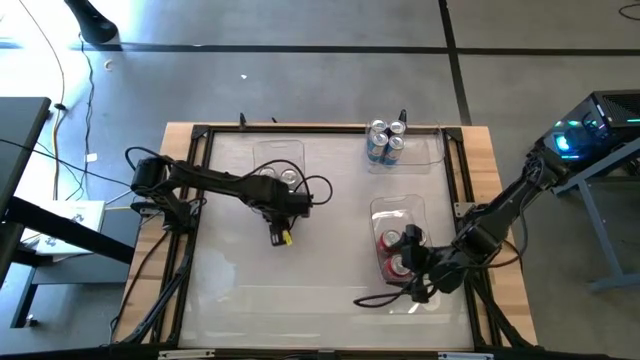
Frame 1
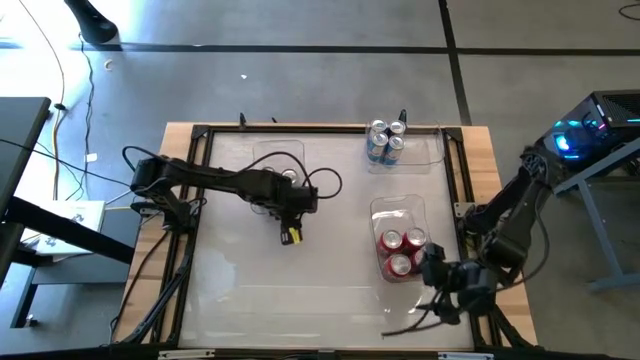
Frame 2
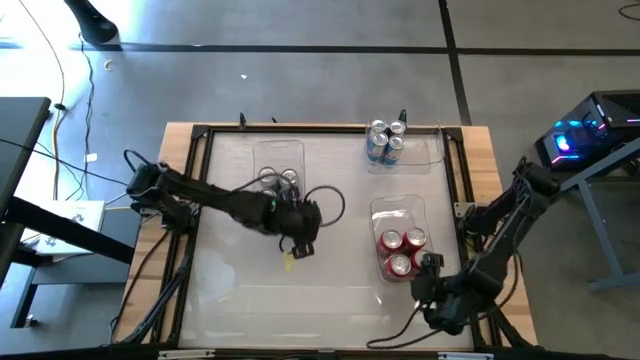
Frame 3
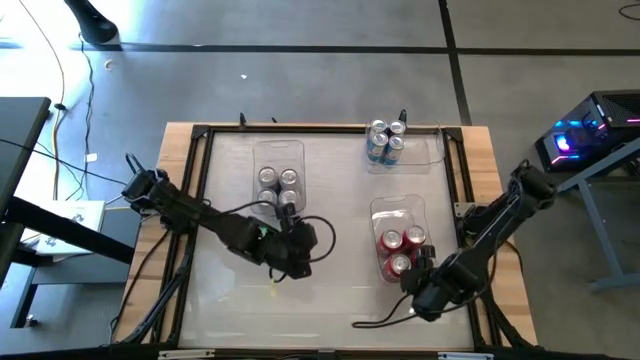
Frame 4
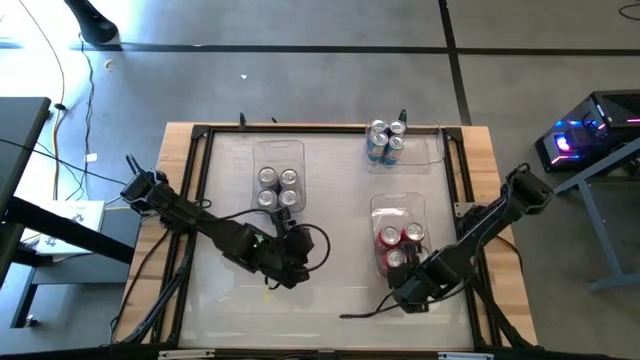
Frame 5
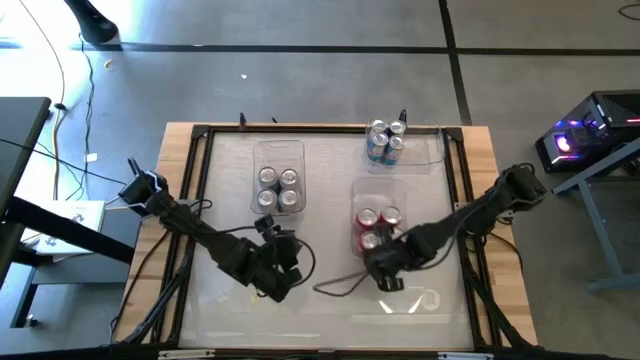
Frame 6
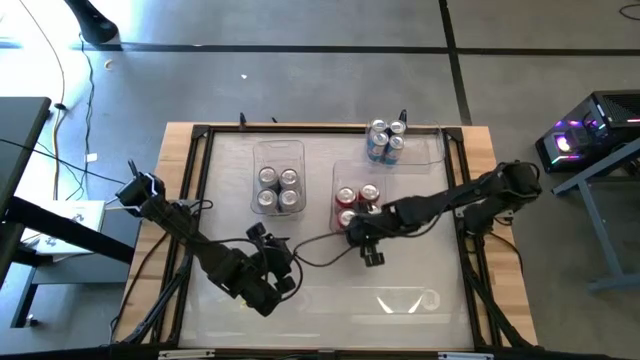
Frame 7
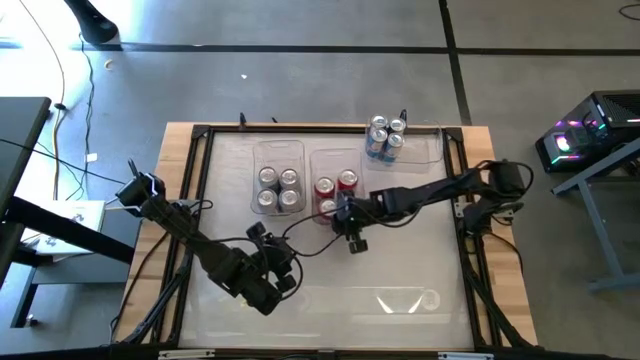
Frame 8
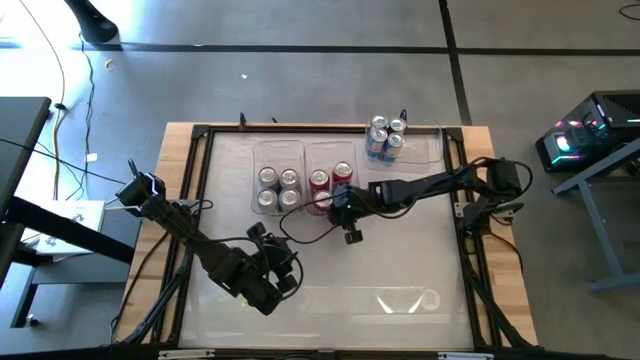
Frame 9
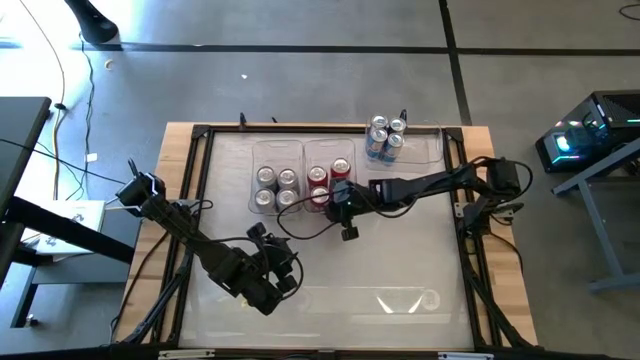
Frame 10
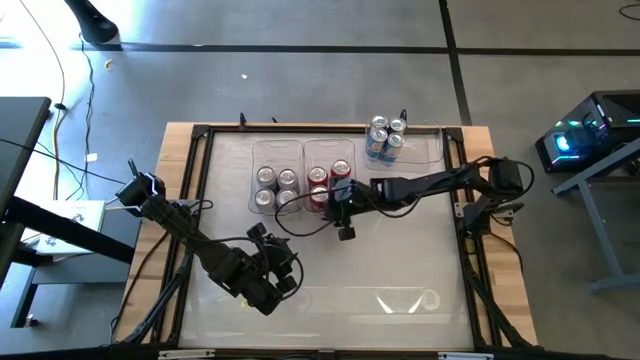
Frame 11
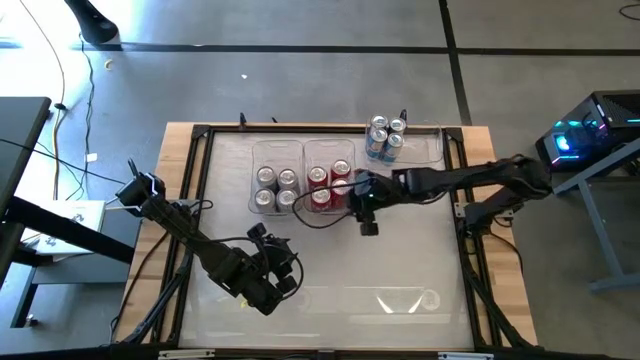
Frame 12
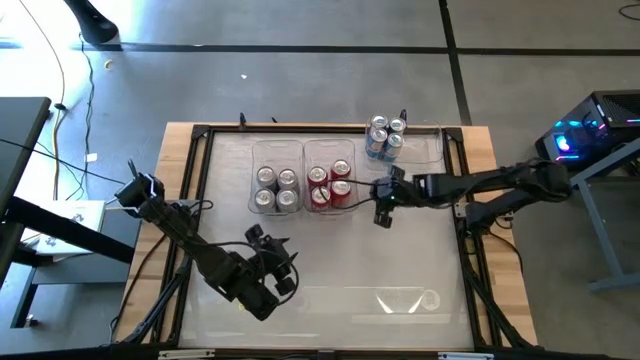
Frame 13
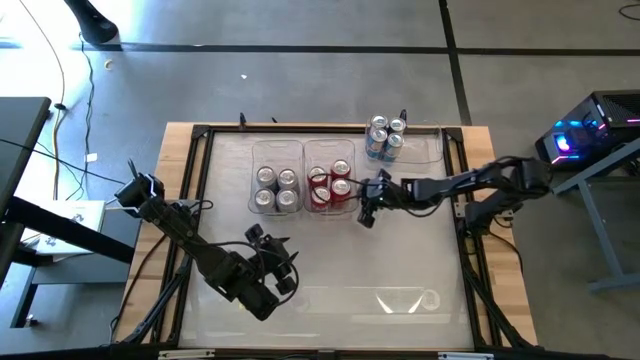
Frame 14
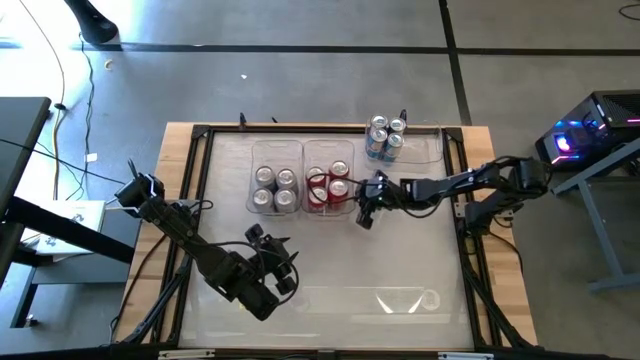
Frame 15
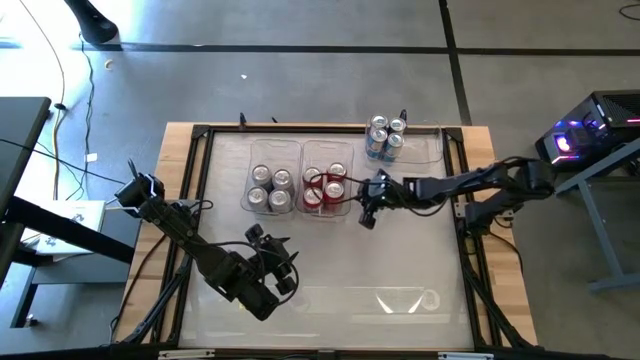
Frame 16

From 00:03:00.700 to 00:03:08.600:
Task: Sort soda cans
Move the bottom right transparent bin to the top center of the table, aligned to the right of the top left transparent bin

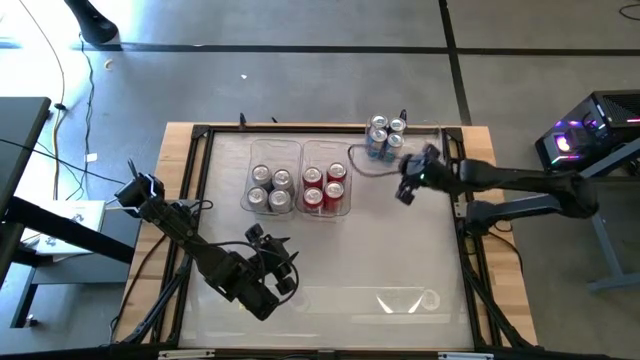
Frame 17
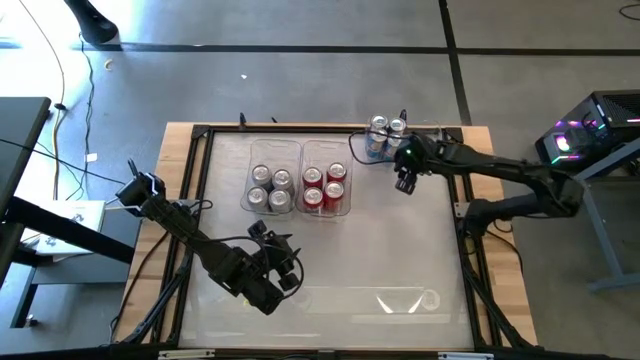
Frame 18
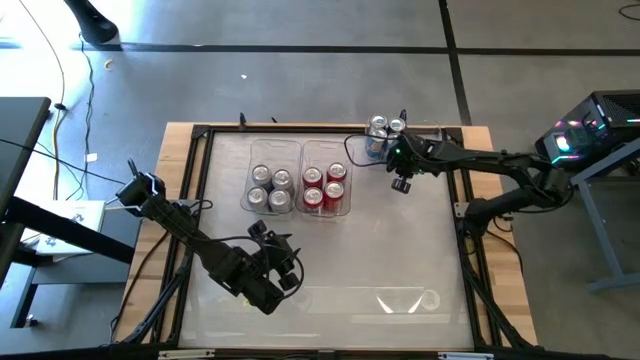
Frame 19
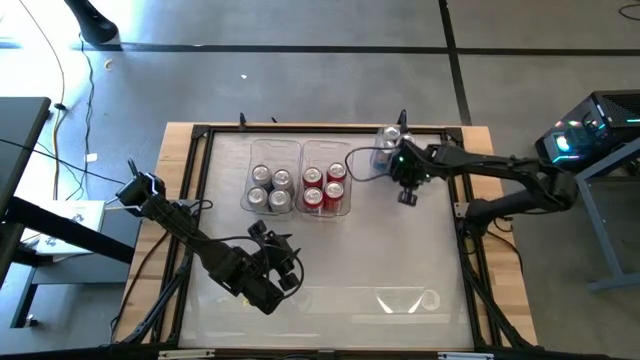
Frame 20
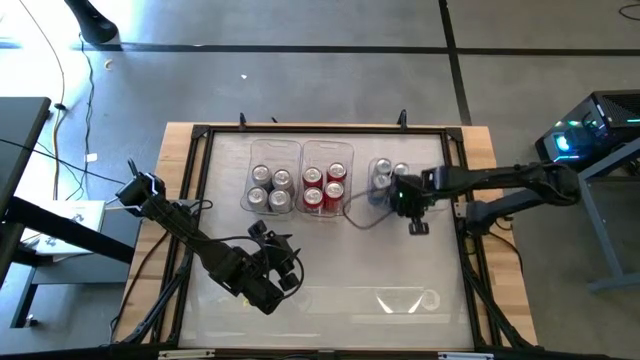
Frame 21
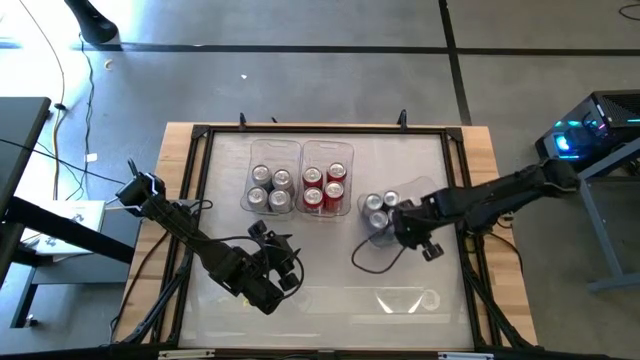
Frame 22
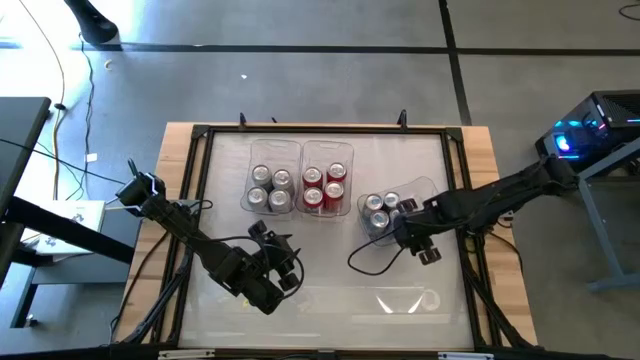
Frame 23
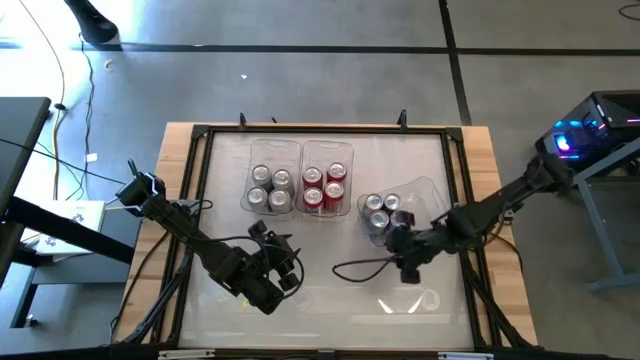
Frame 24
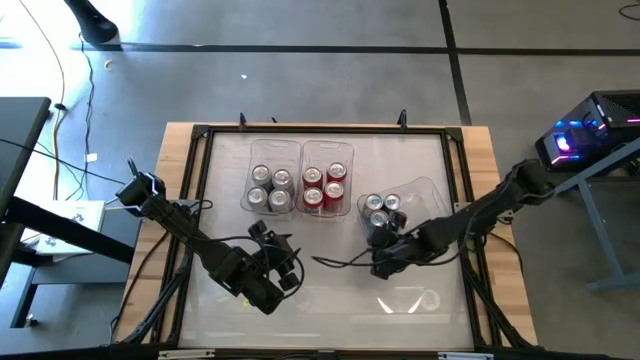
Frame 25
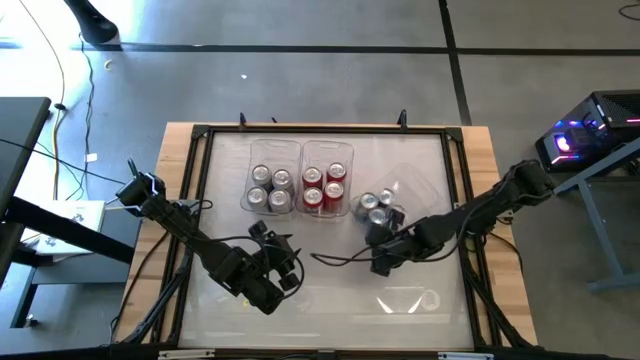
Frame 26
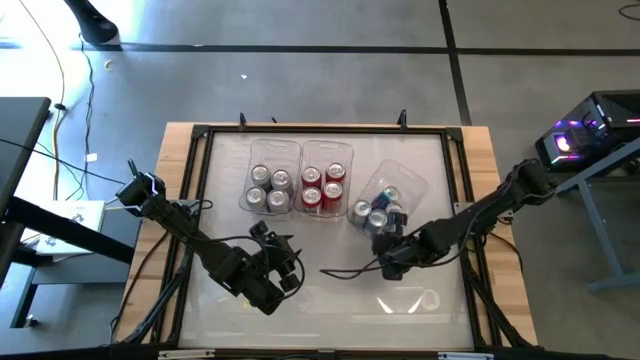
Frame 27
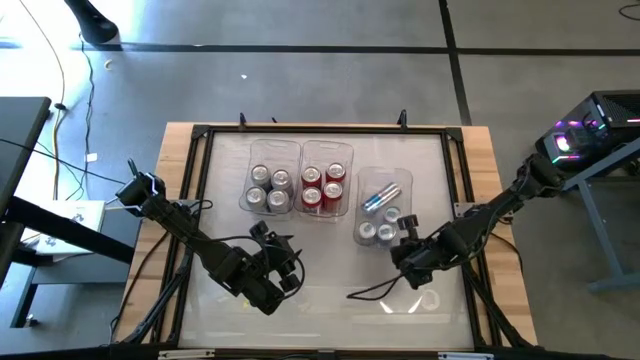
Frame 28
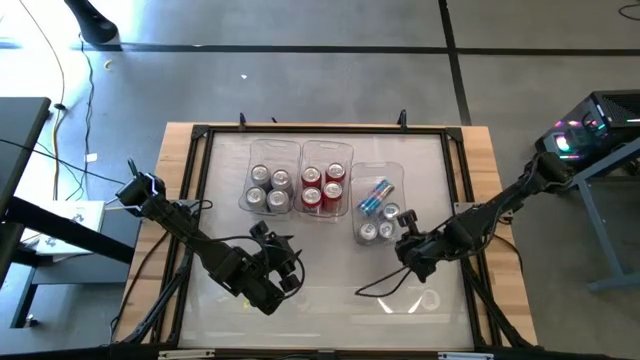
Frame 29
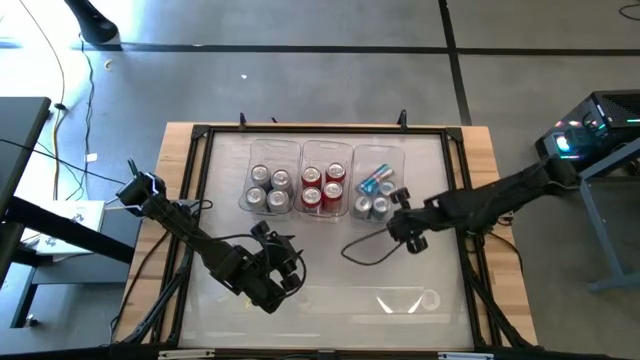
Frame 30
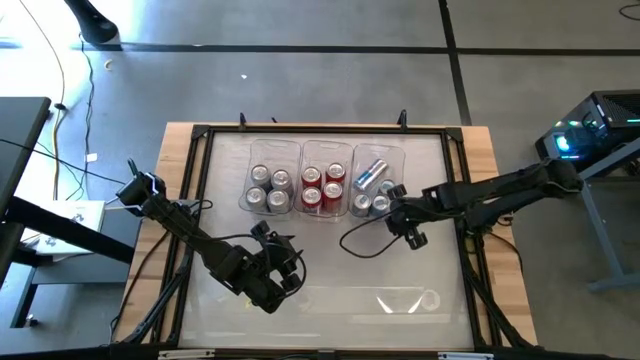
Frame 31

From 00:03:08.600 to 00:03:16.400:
Move the top right transparent bin to the center of the table, aligned to the right of the other transparent bins

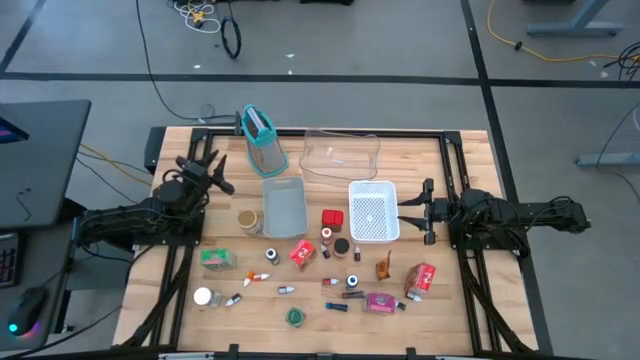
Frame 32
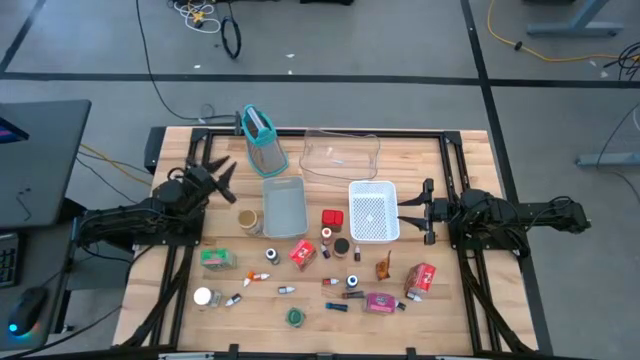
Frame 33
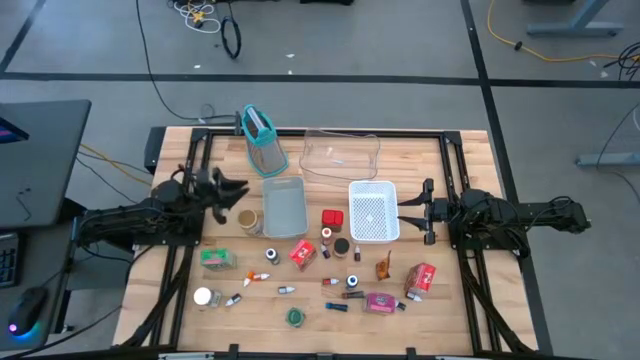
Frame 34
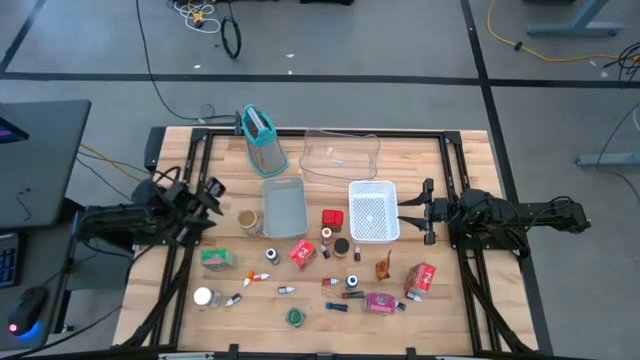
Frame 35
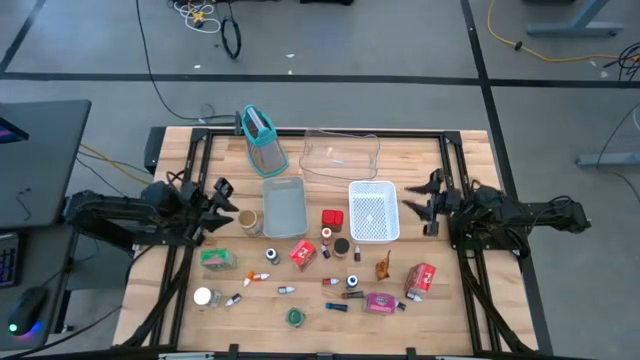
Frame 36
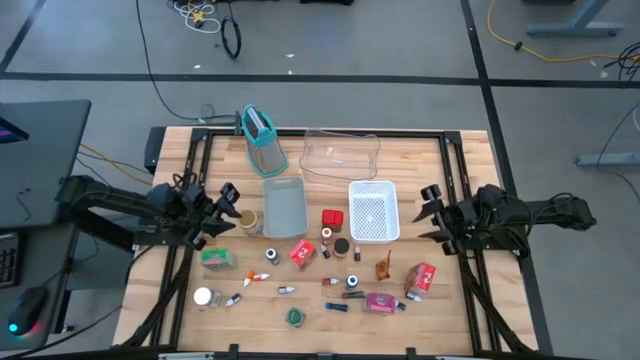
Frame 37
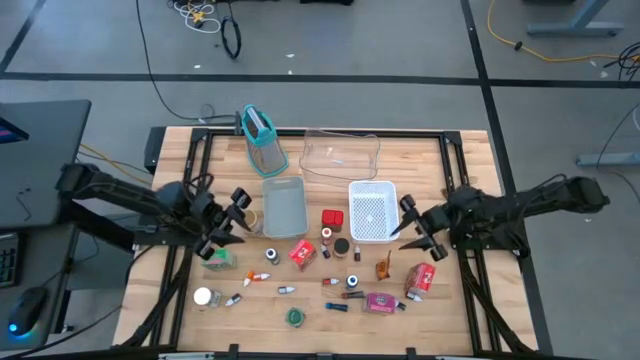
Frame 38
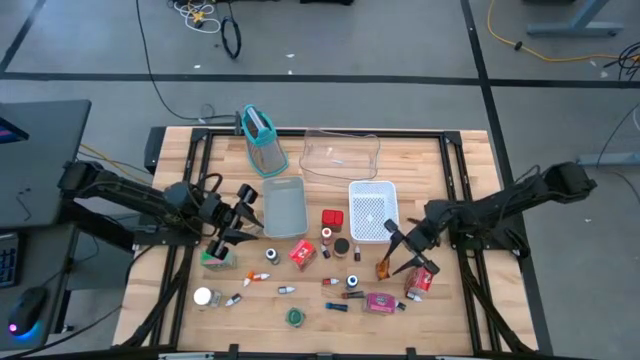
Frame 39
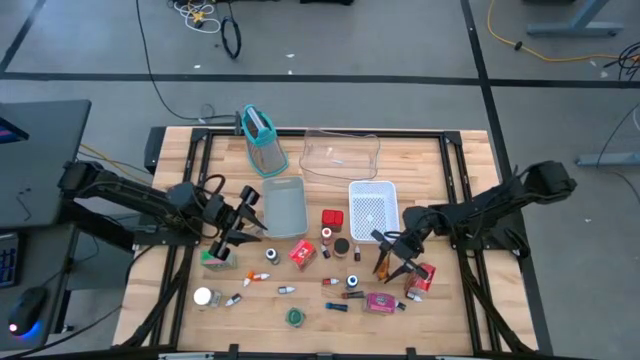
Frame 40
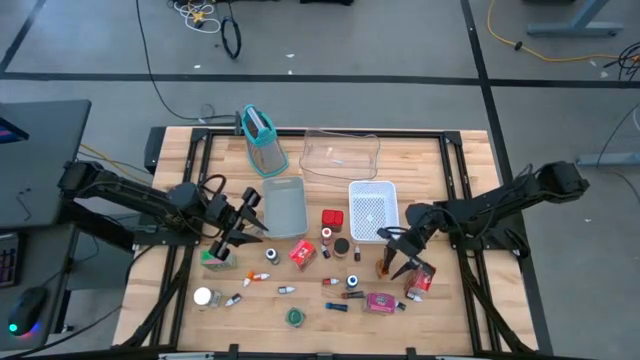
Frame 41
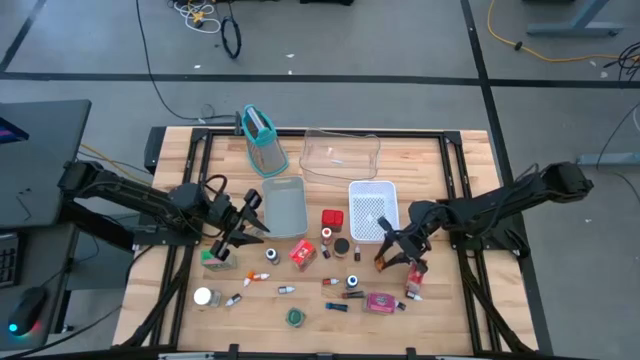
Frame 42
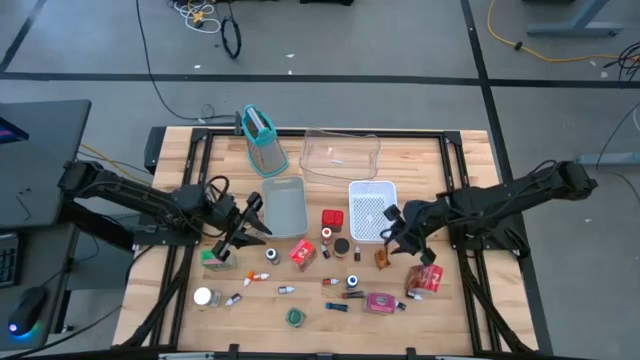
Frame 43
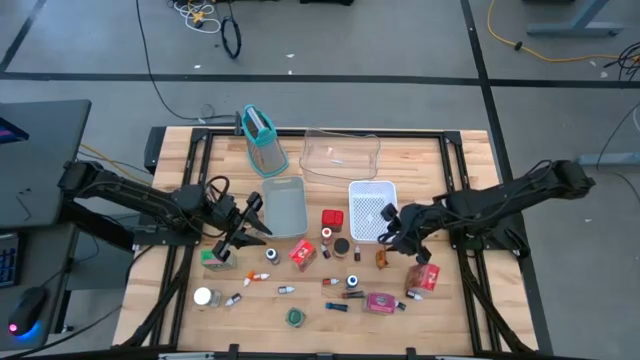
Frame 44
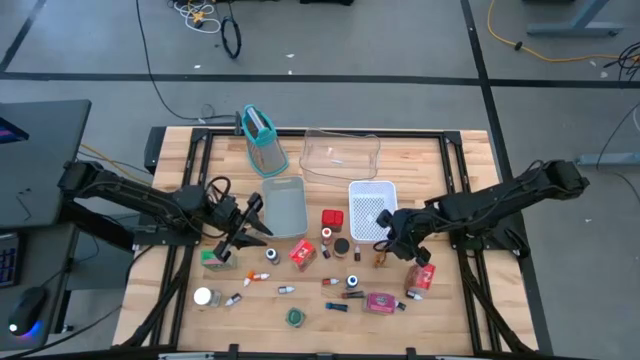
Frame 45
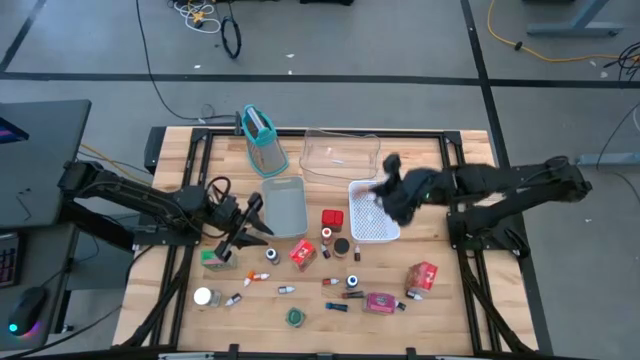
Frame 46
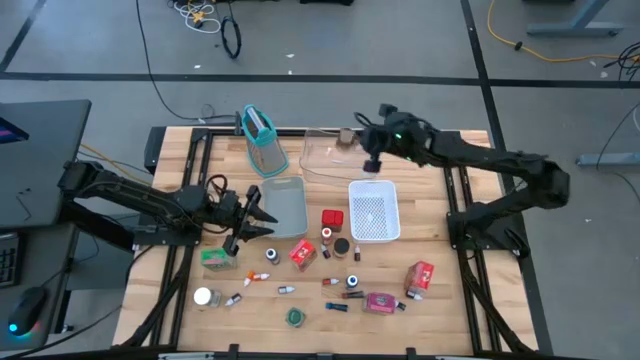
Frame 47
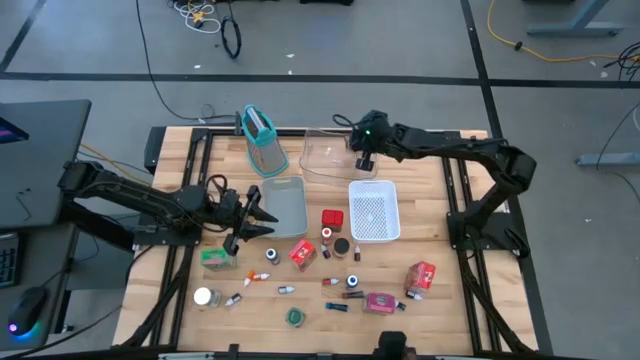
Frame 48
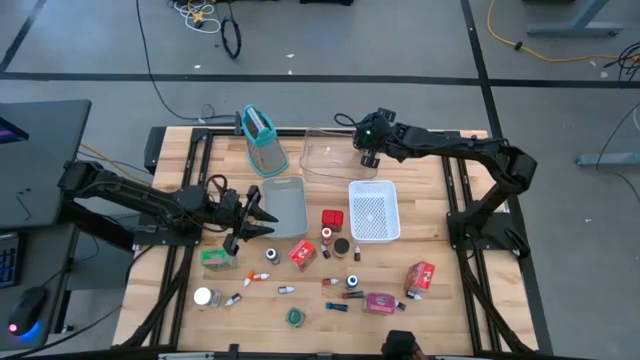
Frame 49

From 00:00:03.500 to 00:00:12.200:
Task: Pick & Place Kitchen Items
Put the orange seasoning pack into the transparent bin
